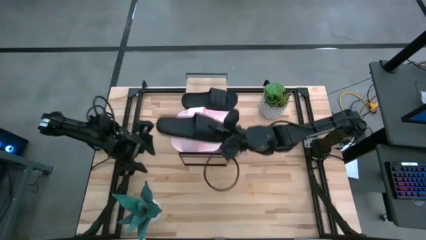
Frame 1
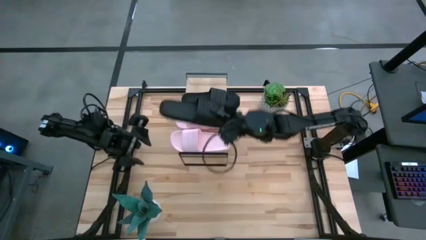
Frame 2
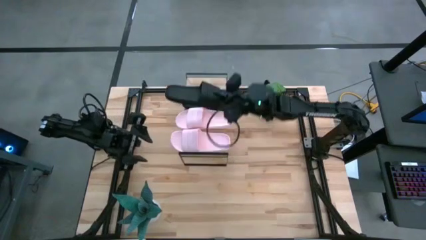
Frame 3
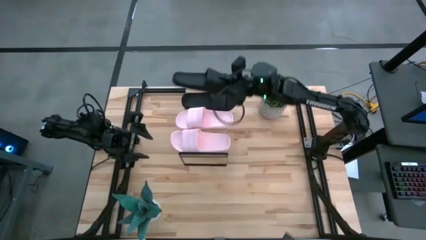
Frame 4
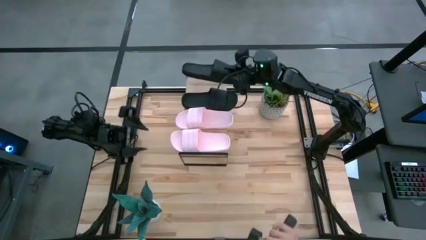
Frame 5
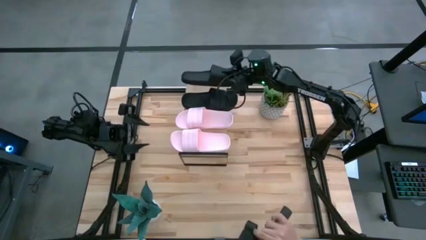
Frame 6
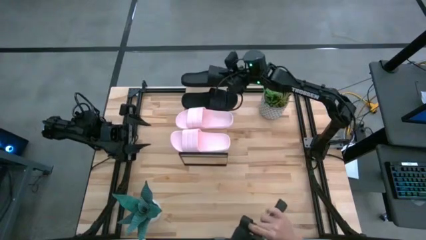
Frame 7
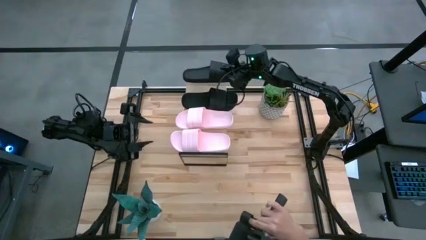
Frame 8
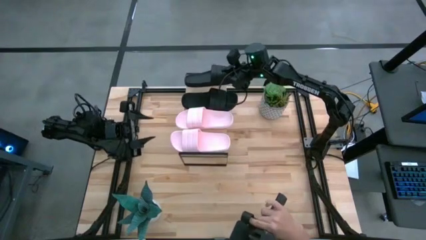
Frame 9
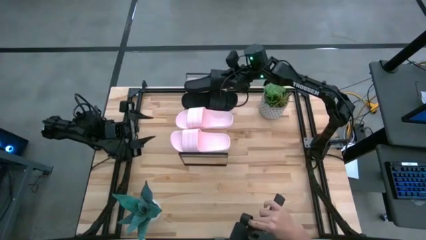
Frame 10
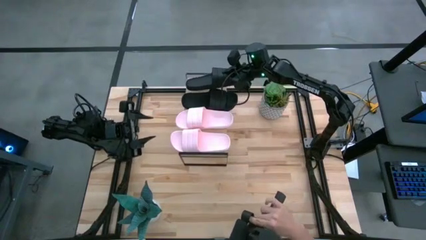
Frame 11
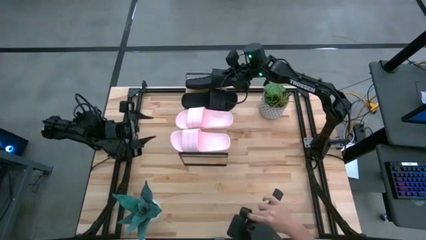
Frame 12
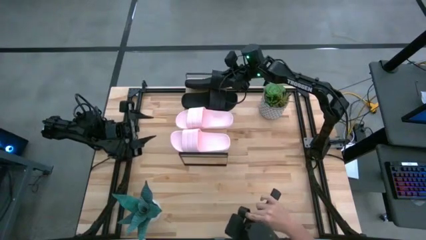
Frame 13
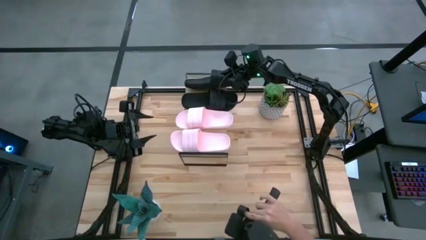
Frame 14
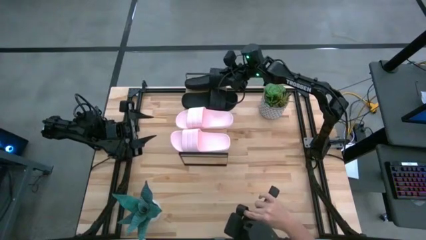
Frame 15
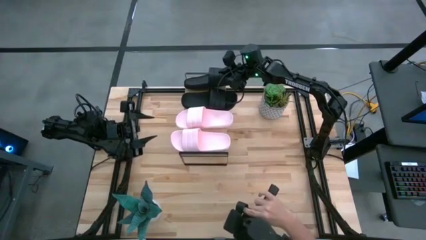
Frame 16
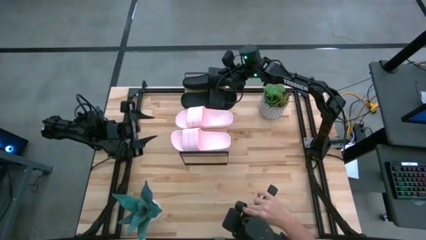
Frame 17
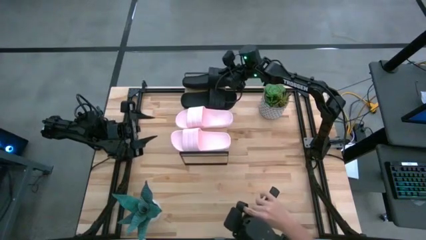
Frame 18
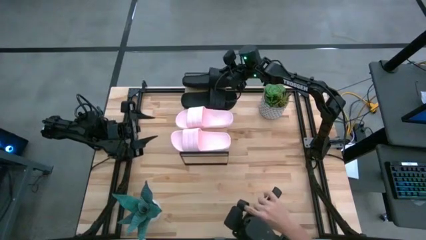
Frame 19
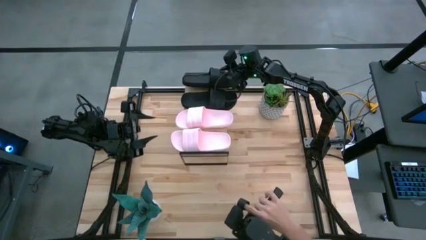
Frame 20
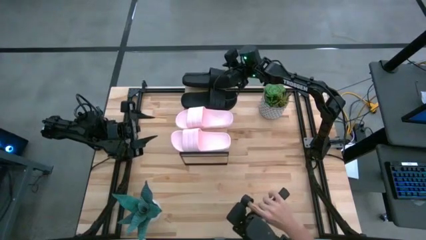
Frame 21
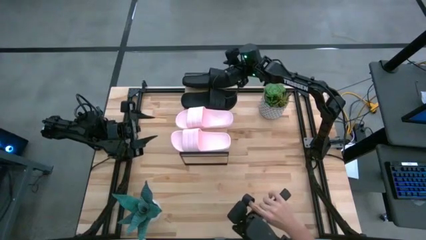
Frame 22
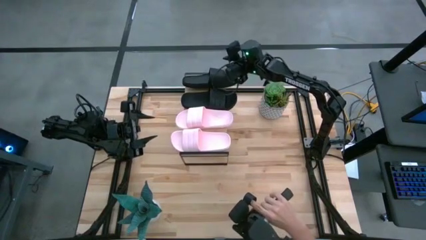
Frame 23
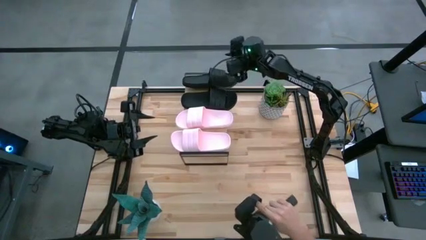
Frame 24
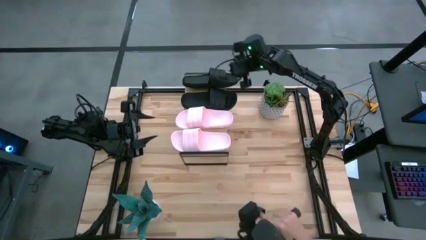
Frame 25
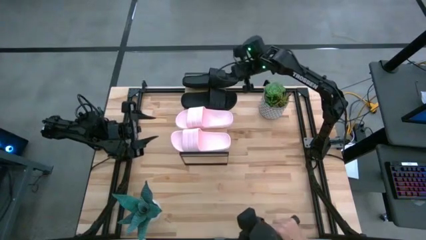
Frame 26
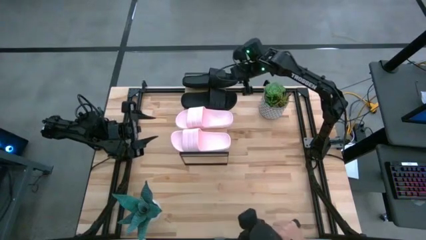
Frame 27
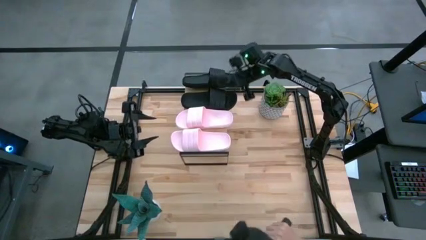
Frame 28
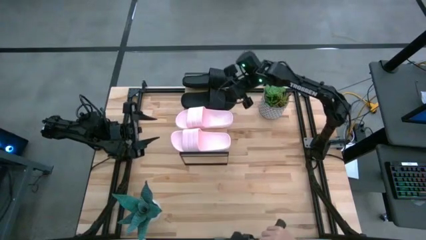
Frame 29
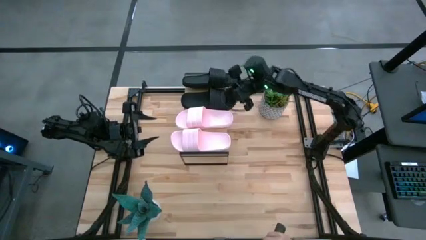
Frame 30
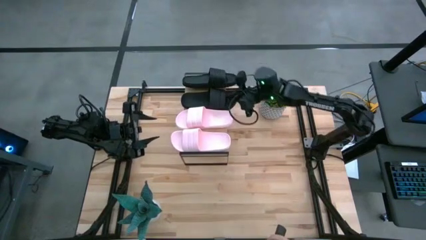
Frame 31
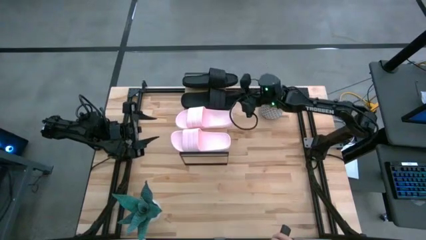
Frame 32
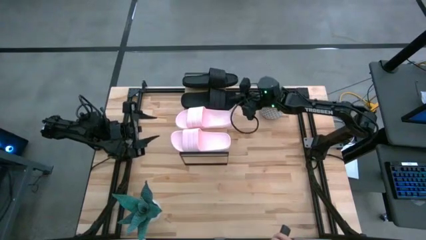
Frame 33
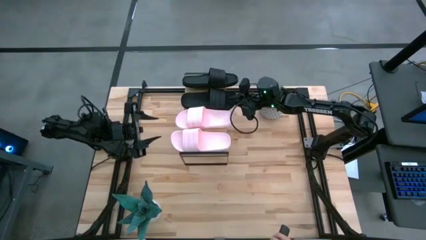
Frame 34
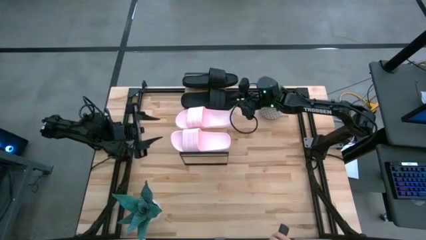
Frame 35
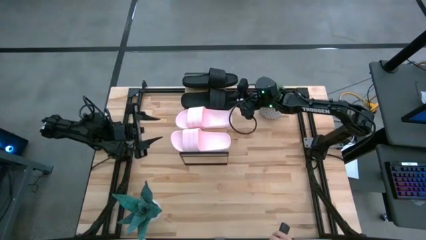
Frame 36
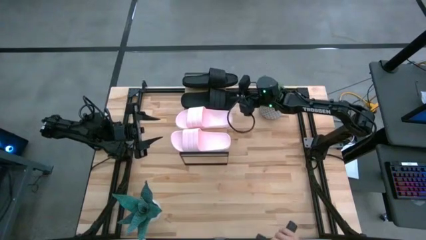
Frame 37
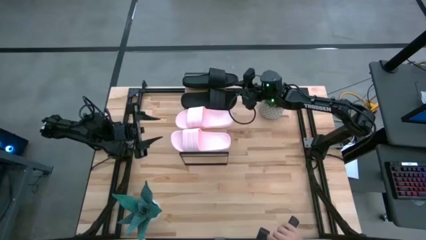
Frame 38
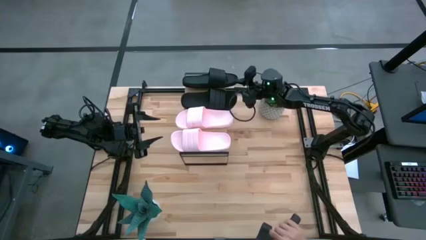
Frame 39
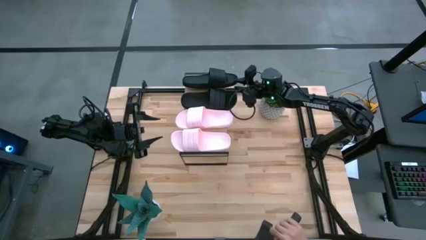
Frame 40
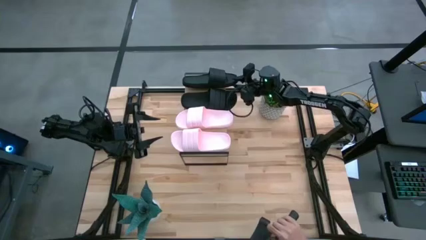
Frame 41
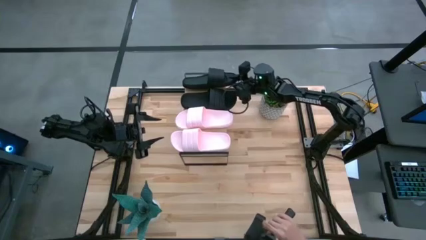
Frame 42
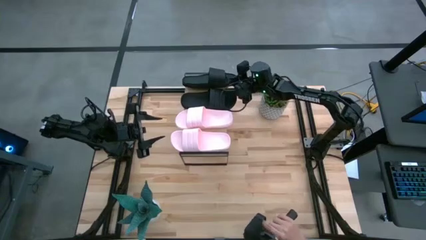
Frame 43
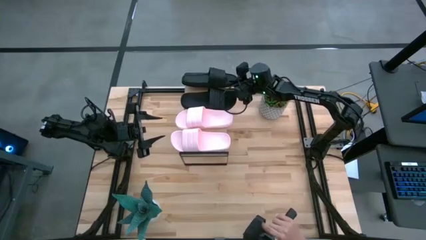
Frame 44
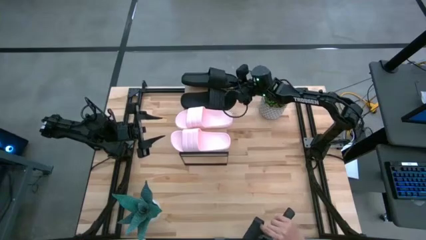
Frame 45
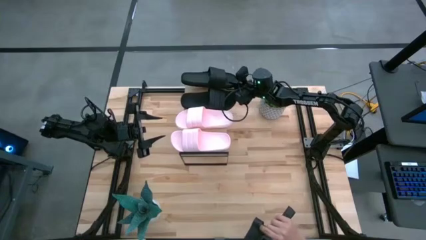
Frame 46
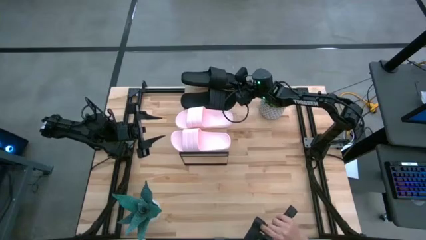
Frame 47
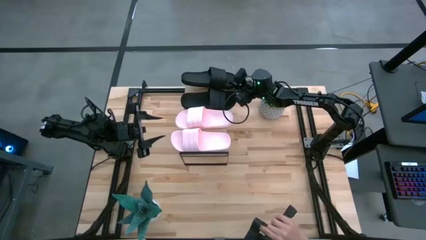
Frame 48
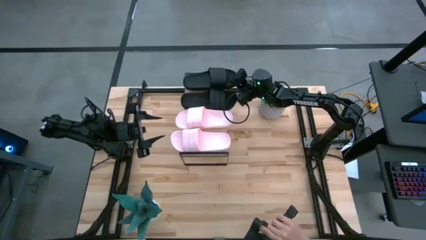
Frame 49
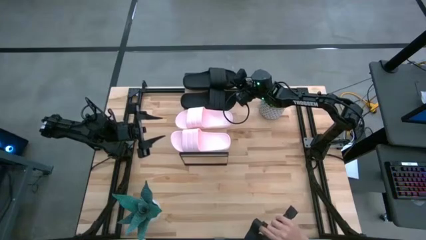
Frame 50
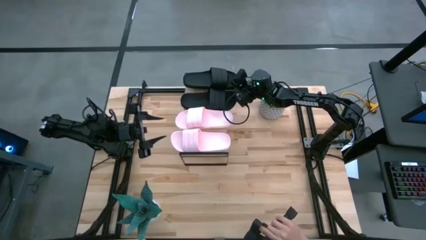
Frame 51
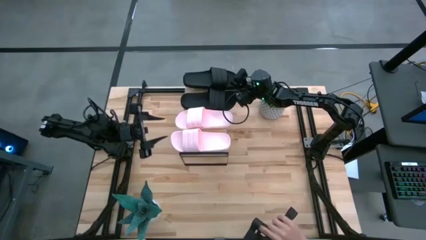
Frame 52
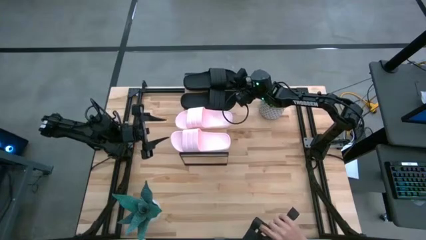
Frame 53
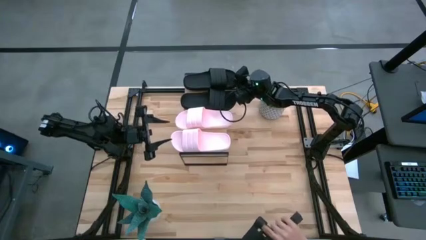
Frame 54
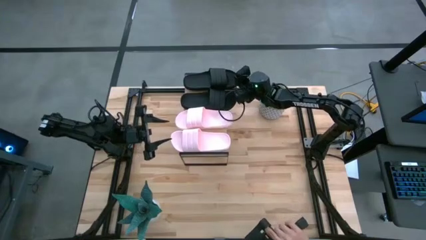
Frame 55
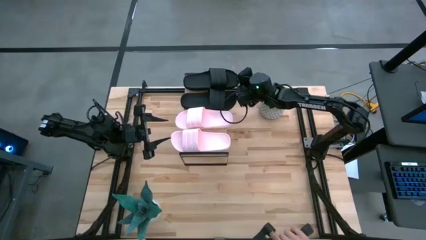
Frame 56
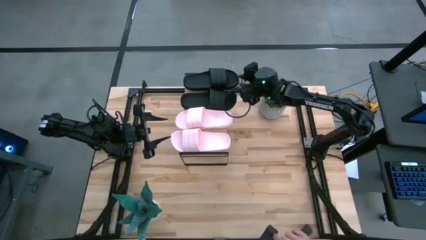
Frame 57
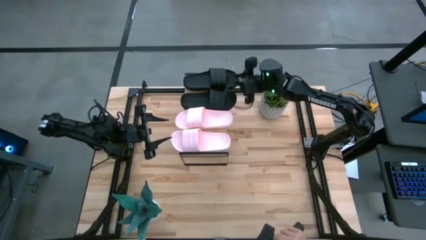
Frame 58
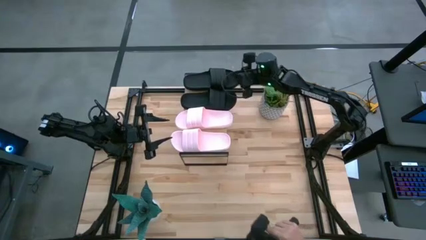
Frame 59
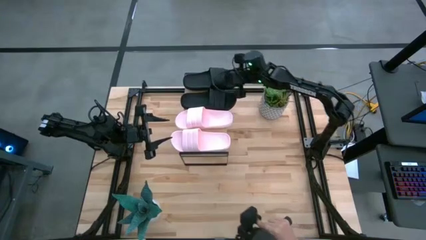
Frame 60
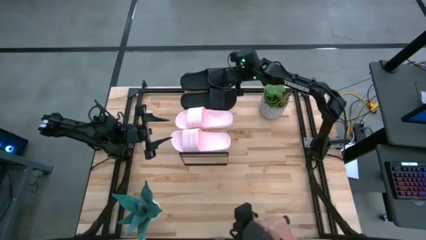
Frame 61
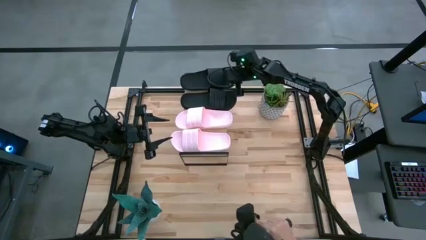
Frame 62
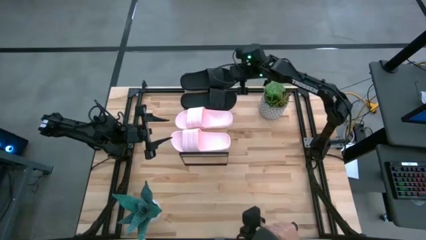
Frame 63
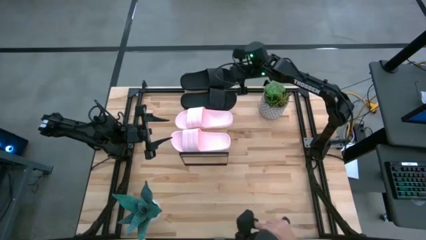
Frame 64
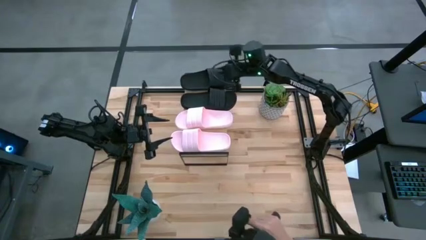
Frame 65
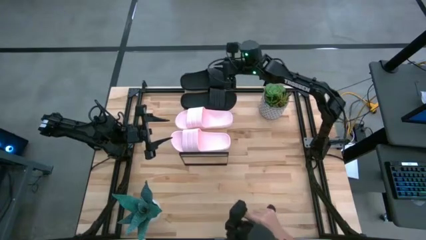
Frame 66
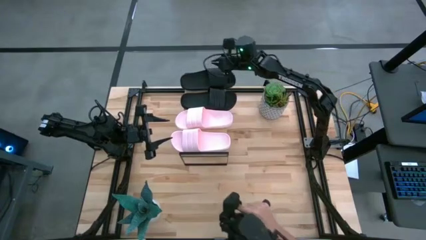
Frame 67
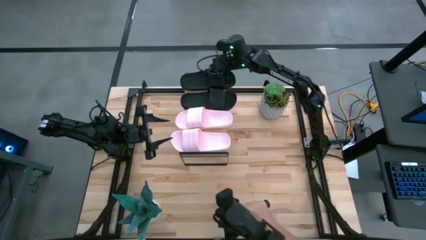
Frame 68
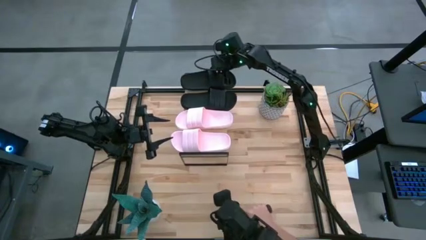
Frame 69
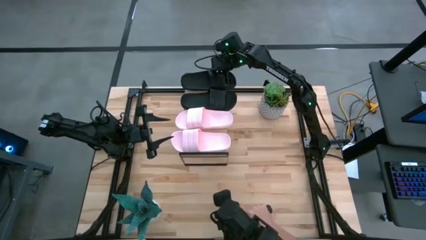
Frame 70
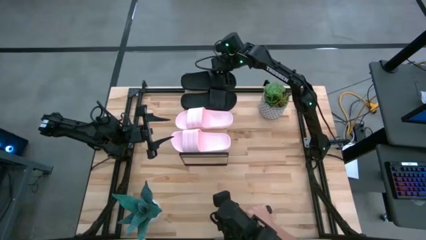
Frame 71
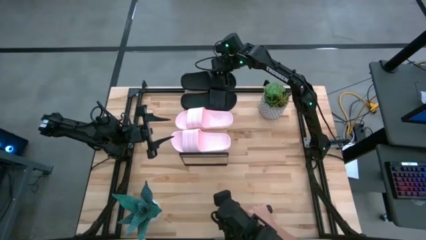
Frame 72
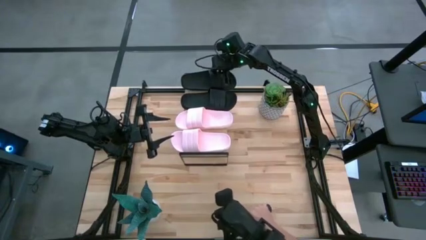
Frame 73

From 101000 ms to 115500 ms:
Task: Pick and place slides into the shelf
Put the black slipper on the shelf

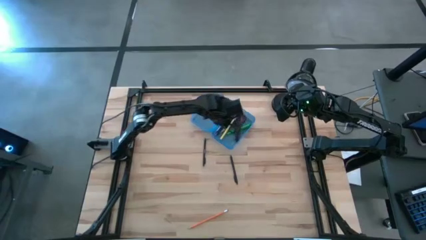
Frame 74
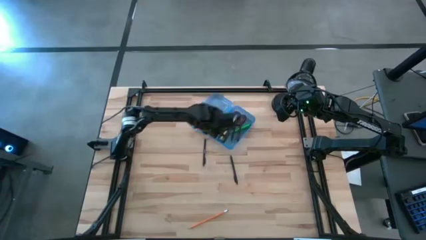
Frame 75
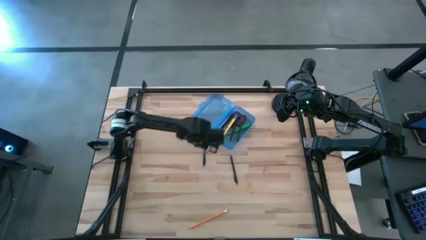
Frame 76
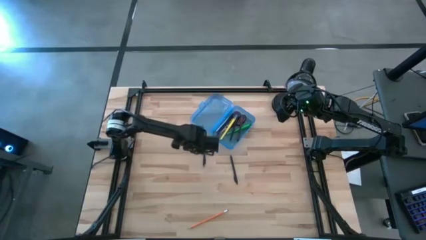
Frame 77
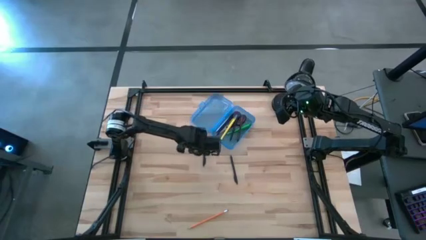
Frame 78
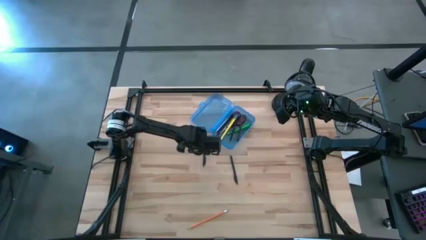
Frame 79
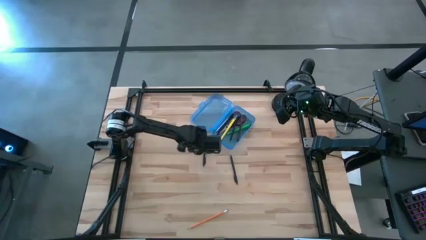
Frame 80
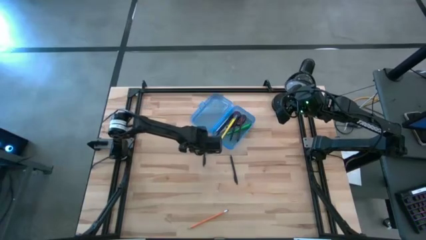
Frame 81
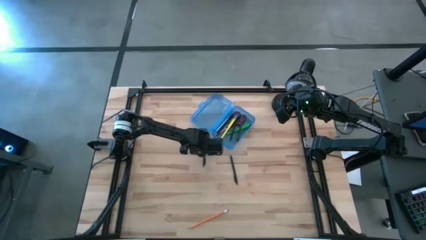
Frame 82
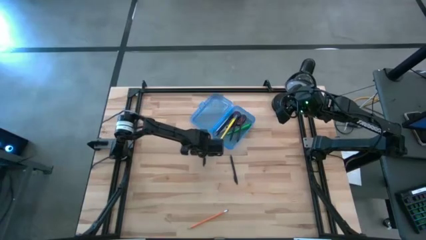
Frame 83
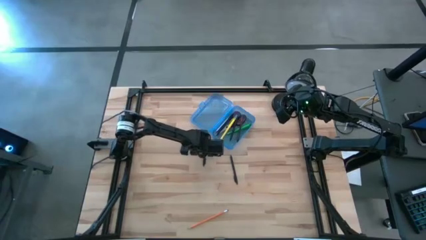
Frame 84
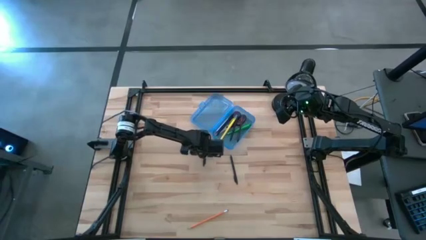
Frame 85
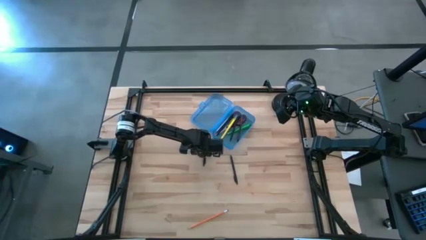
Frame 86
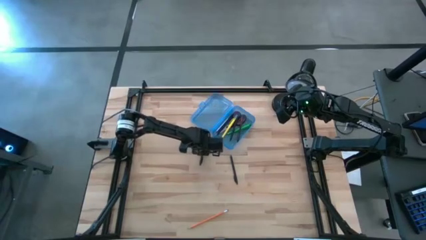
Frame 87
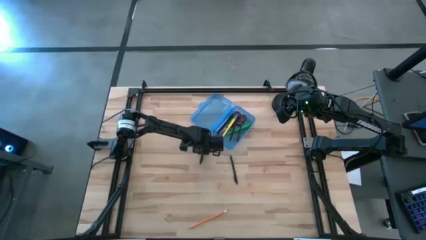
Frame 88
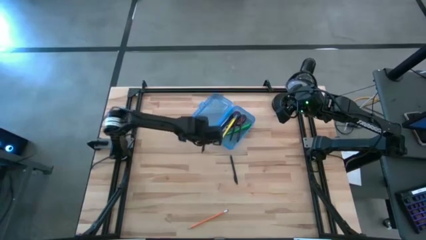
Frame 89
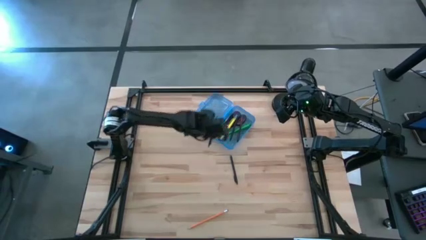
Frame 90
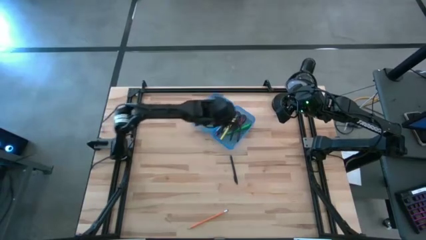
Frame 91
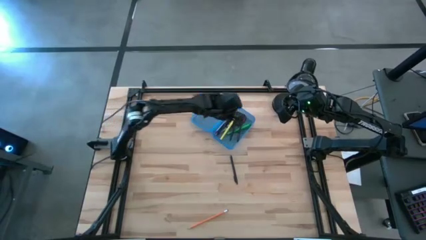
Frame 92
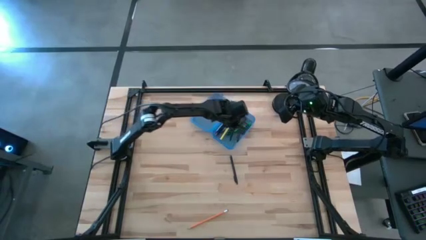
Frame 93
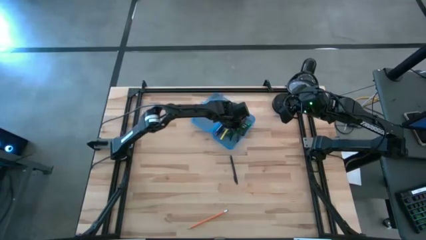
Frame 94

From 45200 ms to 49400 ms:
Task: Pick & place school supplies into a supply box
Put the black pen into the blue supply box
